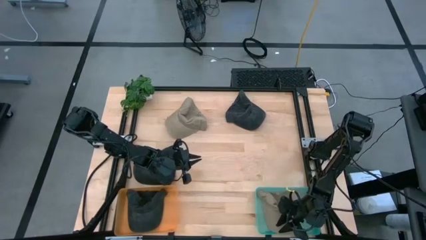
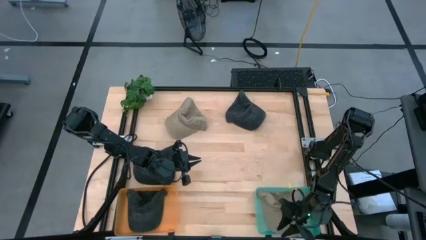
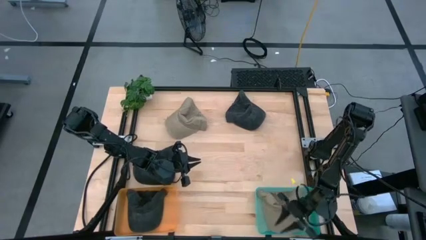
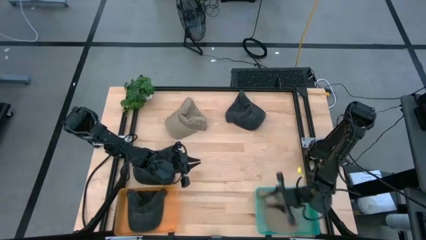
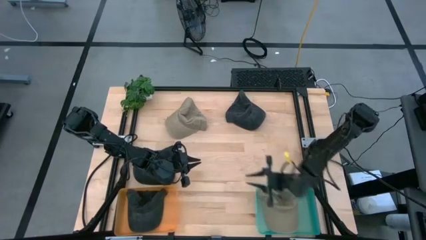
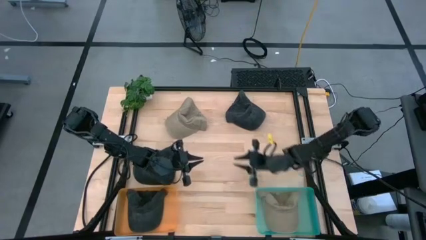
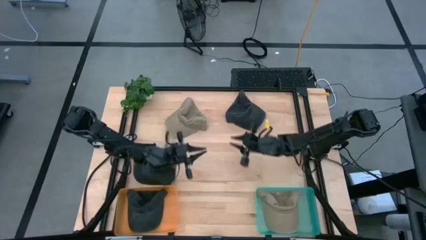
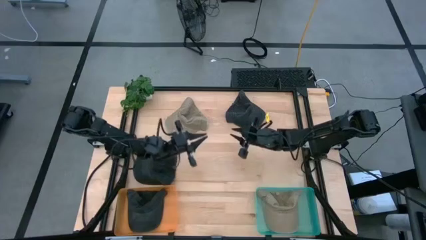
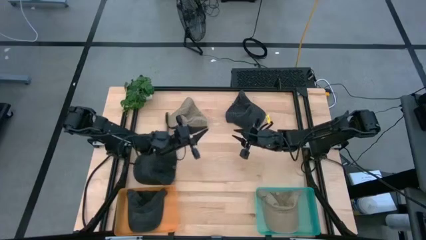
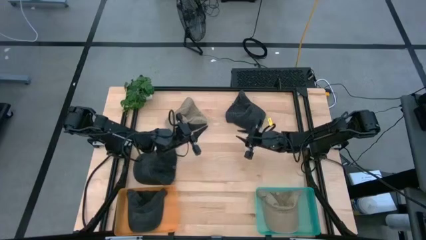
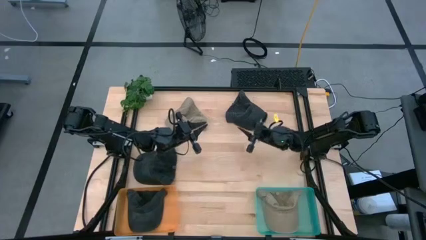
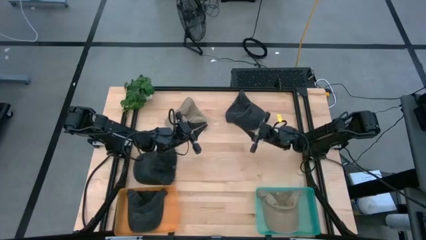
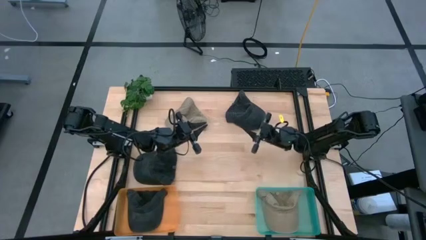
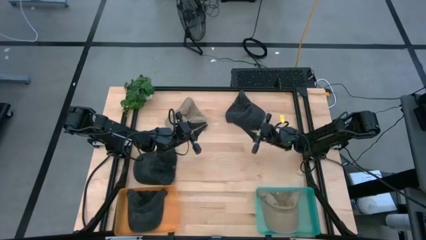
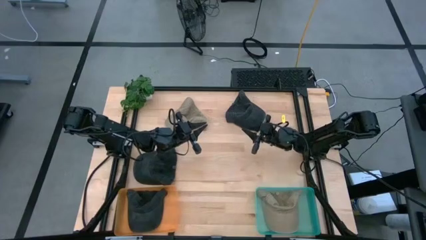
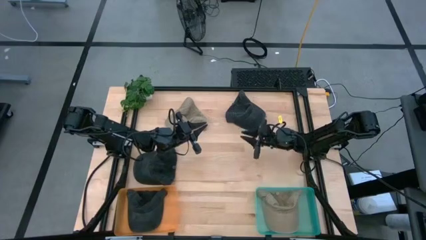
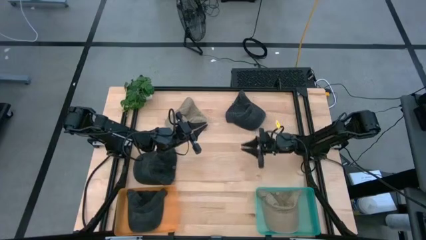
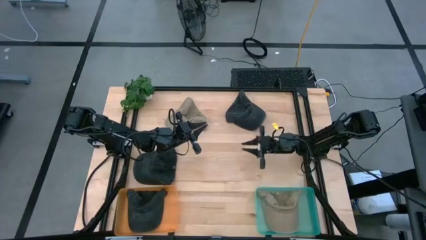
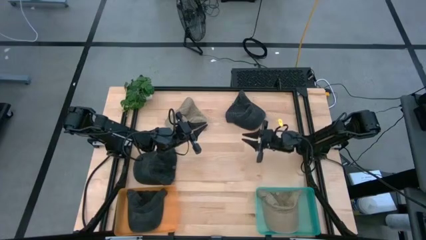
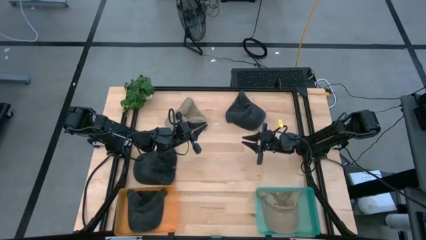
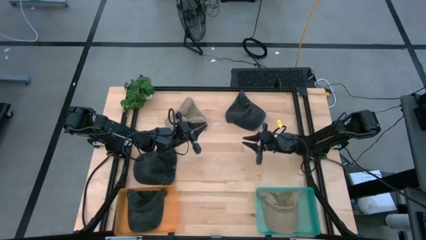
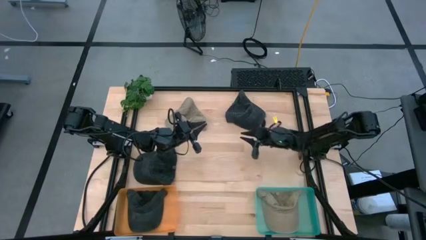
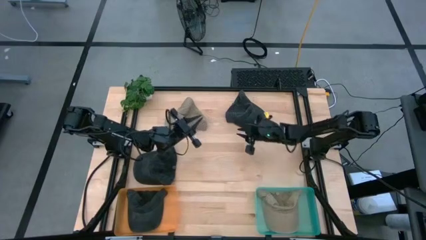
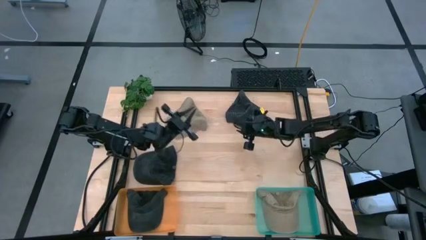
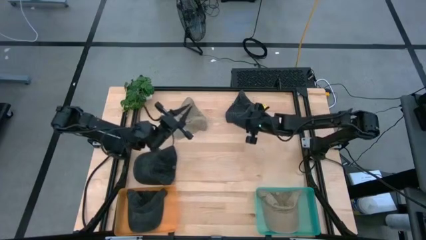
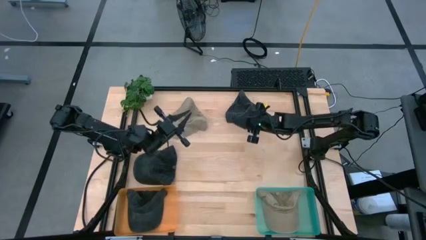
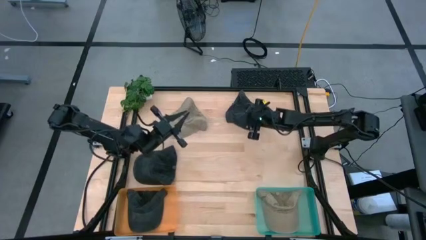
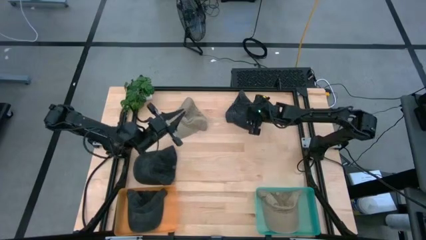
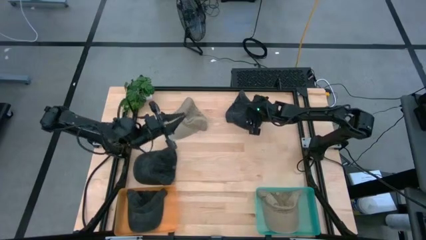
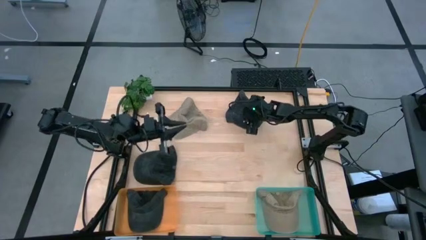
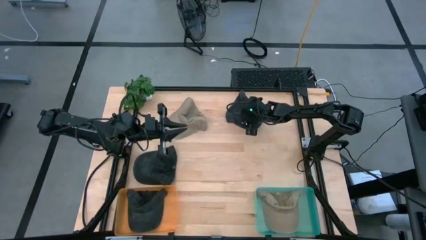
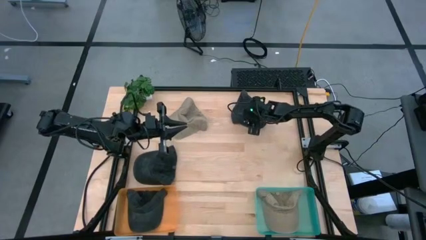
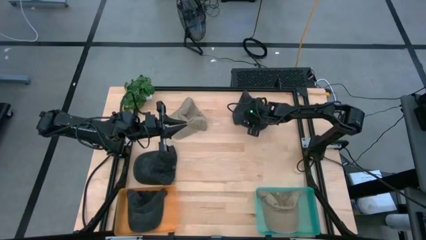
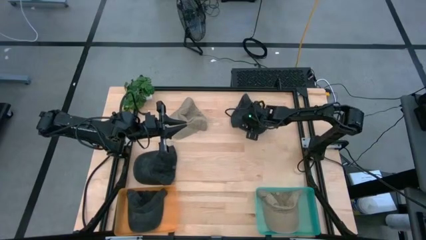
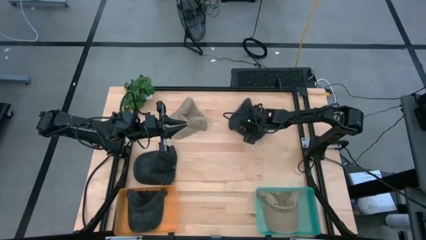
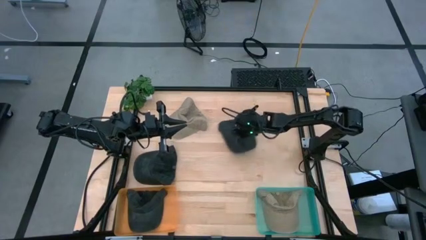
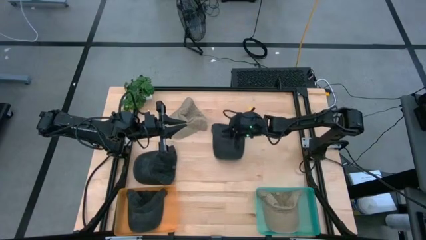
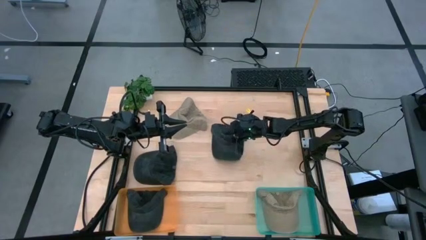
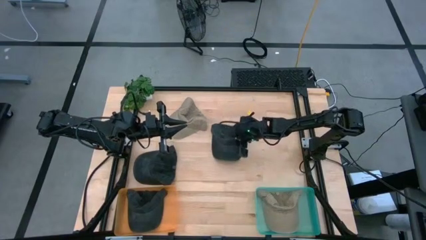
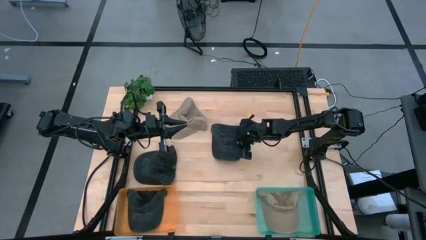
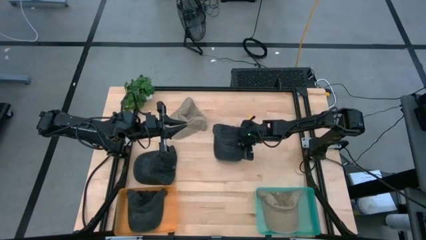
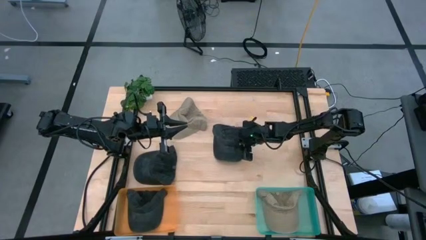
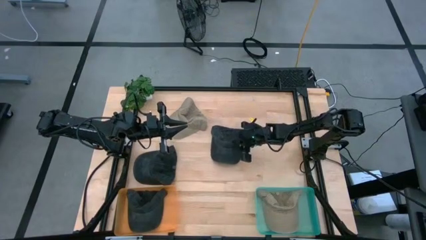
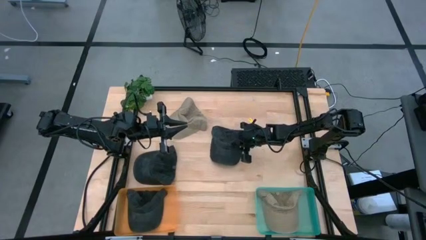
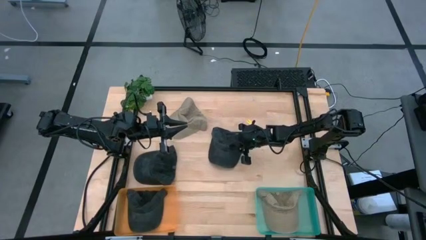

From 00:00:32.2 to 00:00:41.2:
Task: Pick & Place hat
Put the top black cap into the orange bin

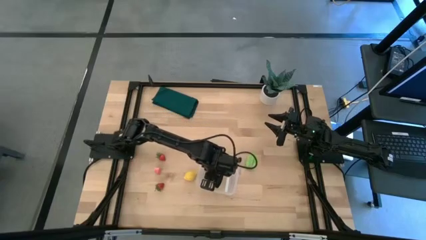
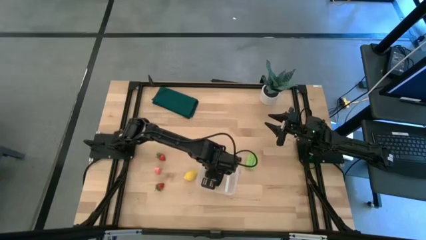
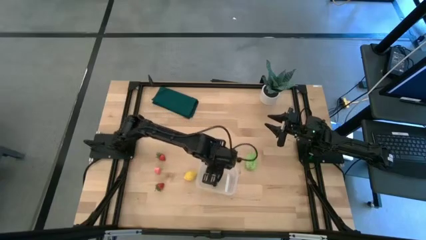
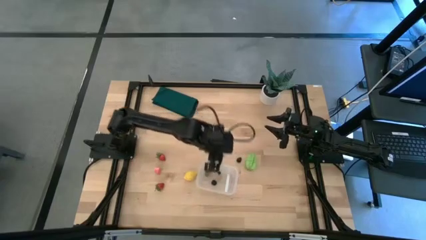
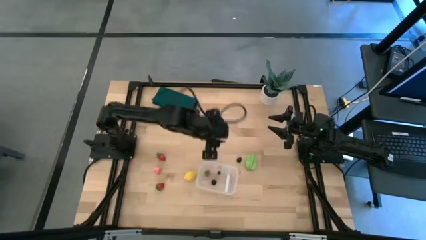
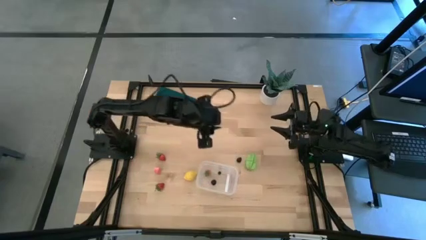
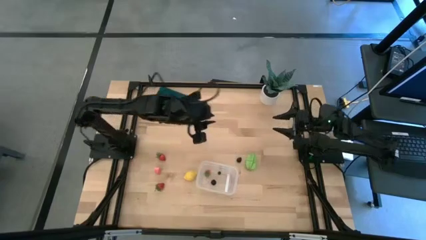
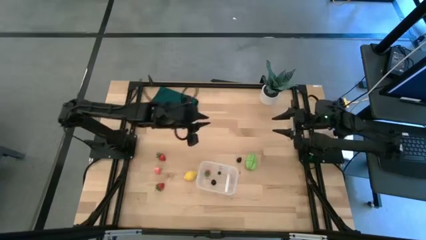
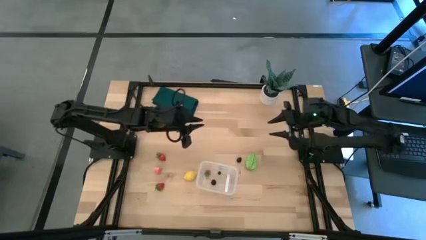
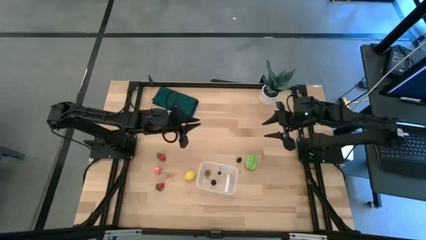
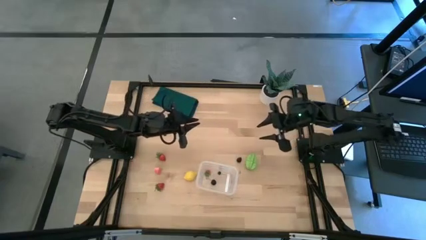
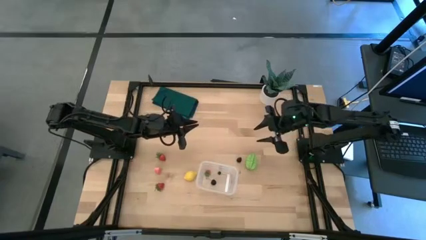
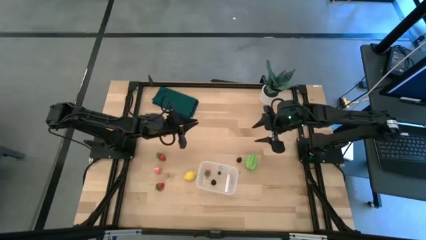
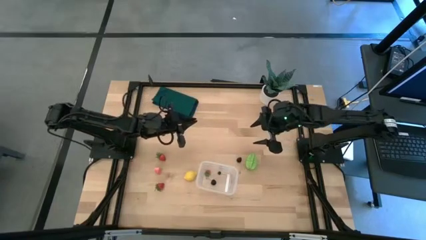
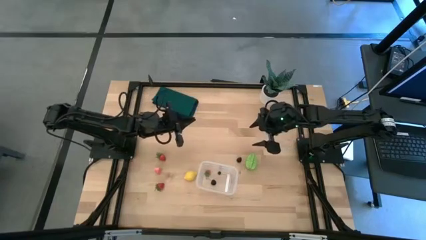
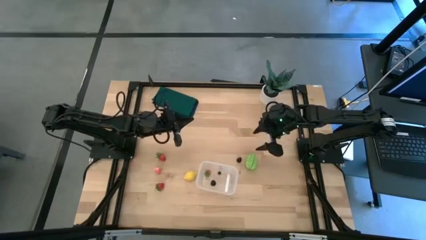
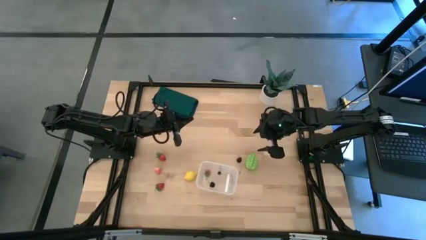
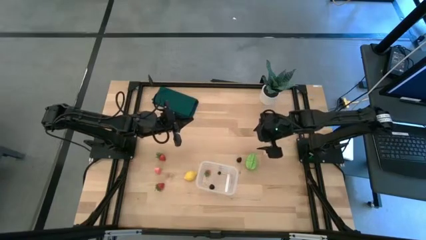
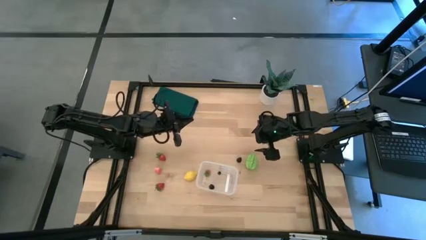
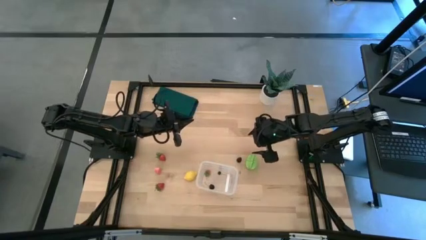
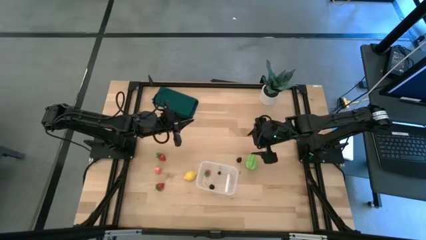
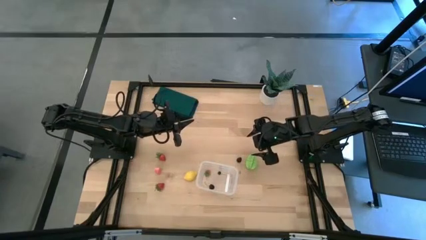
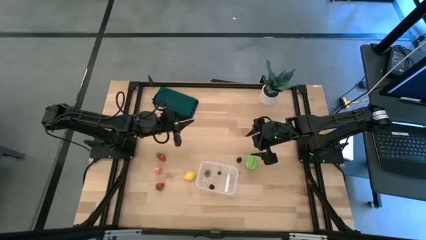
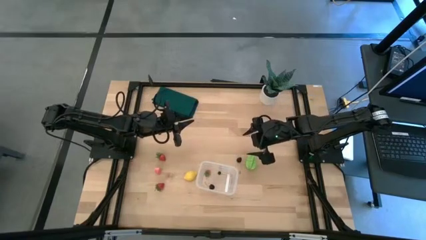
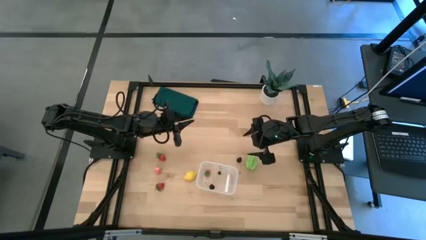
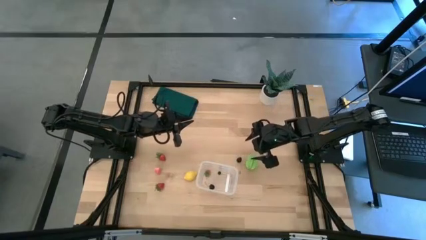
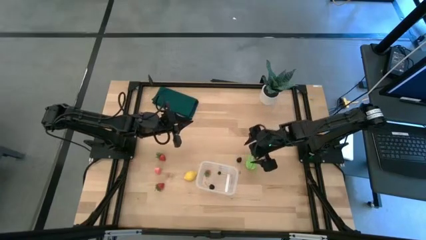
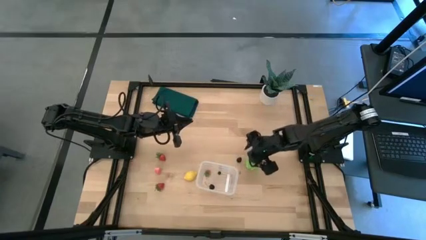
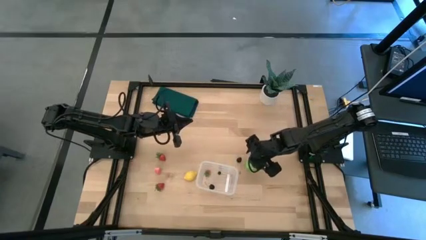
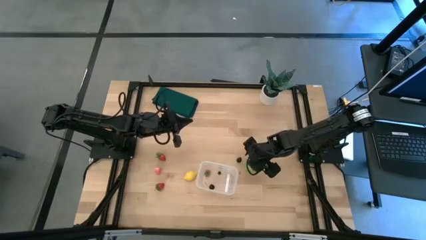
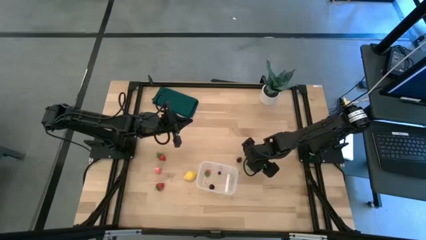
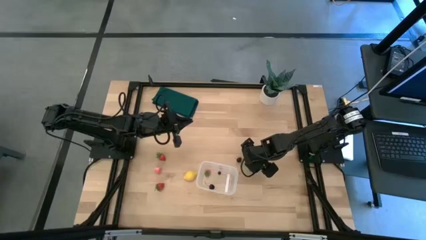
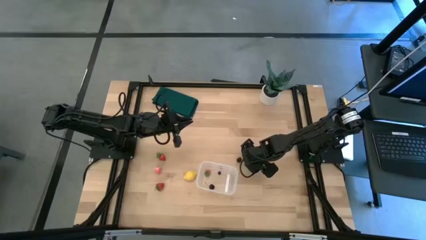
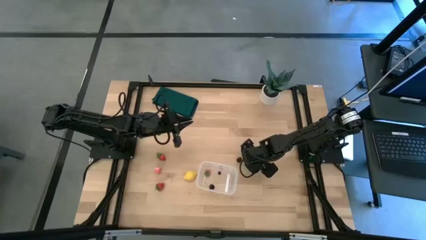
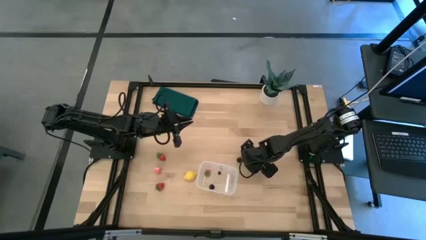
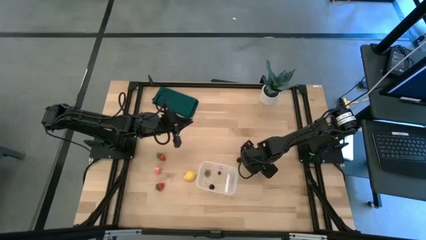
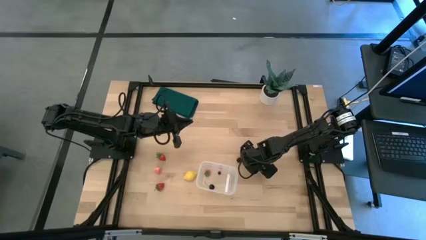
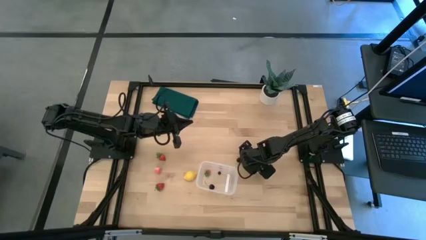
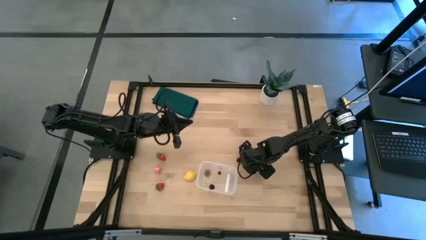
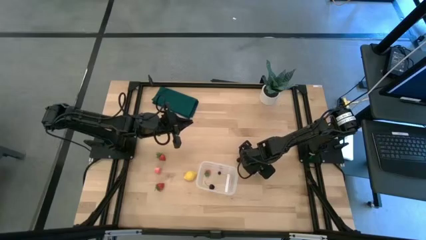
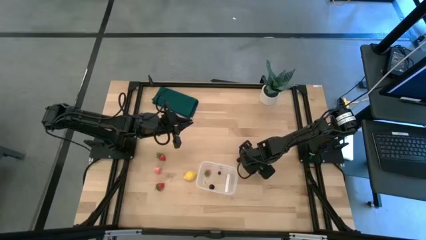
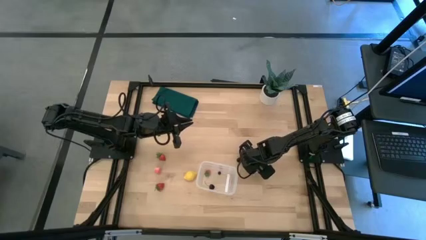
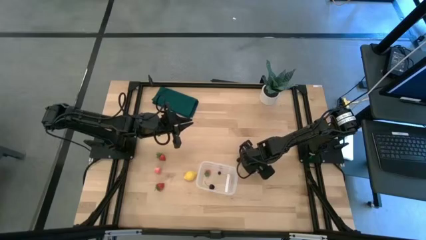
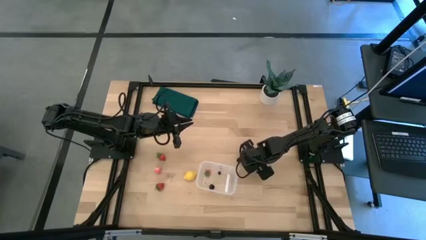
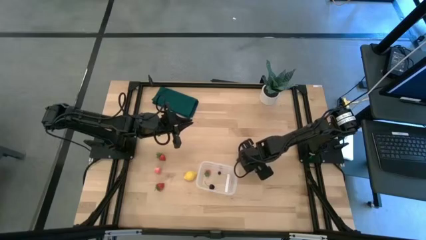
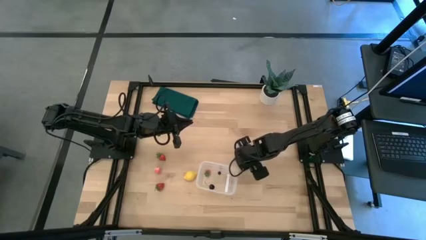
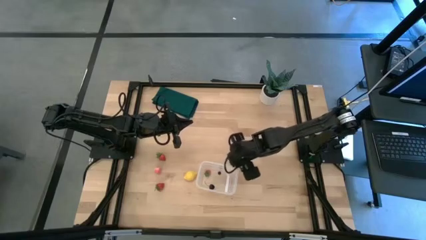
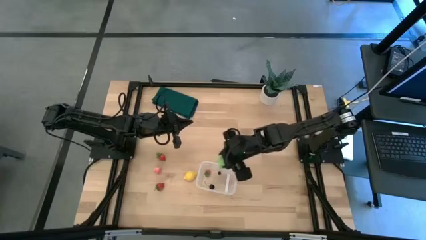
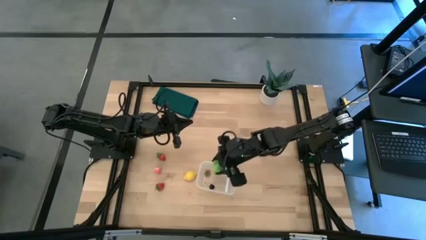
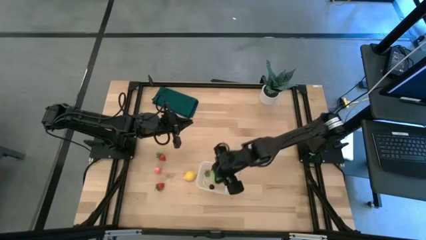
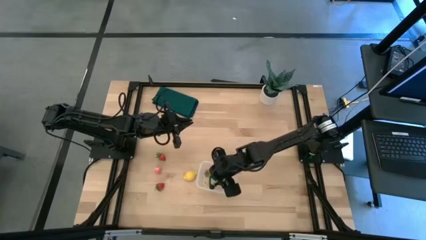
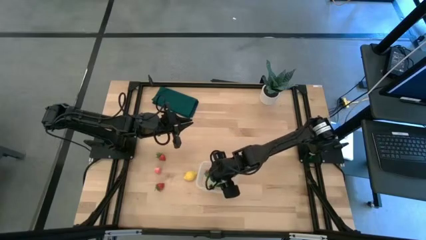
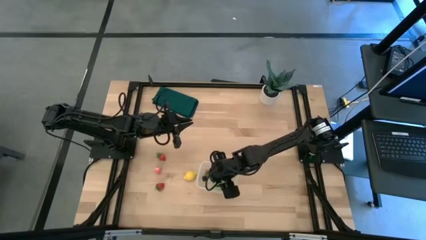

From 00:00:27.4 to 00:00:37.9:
Task: Pick and placing Produce into tupperware
Put the starfruit into the transparent bin
